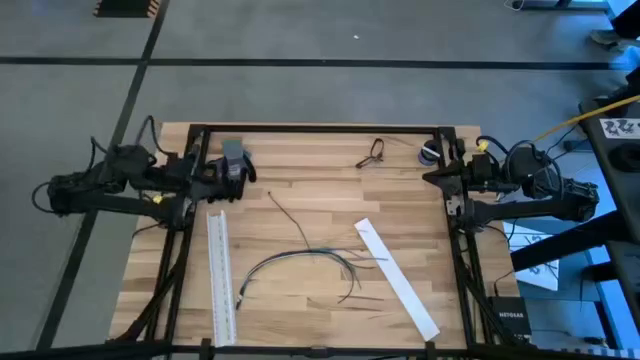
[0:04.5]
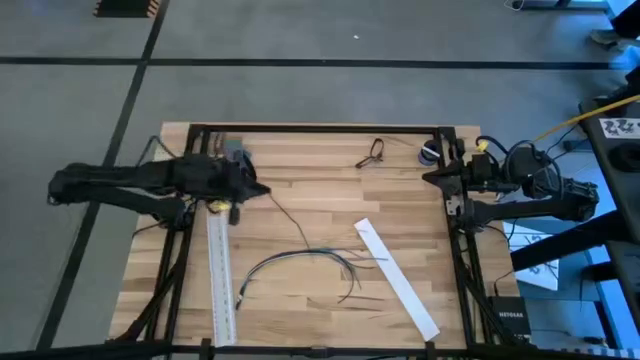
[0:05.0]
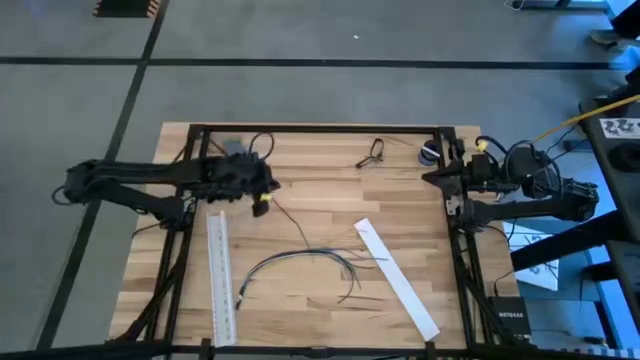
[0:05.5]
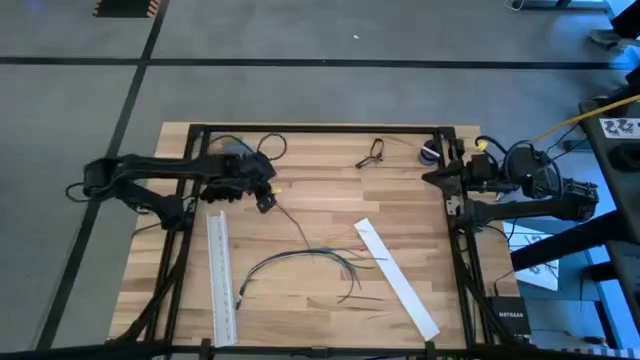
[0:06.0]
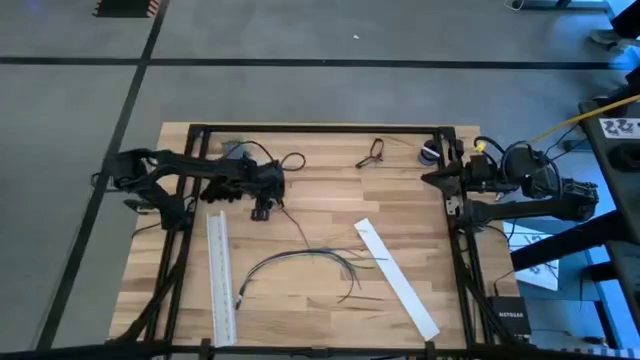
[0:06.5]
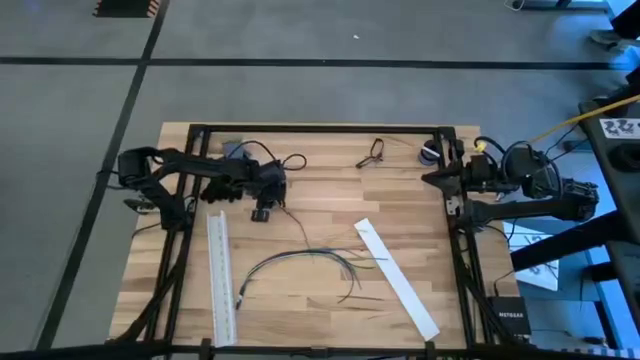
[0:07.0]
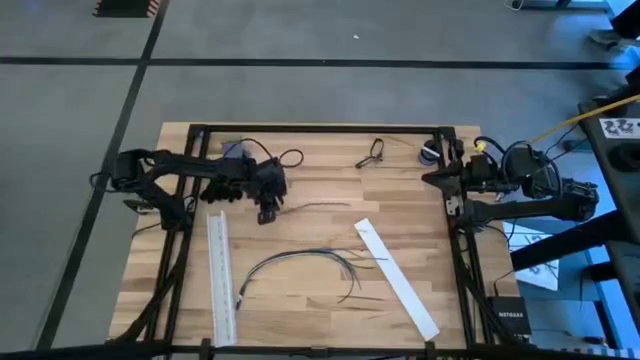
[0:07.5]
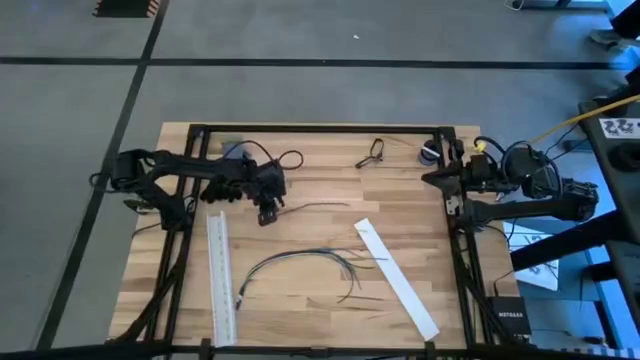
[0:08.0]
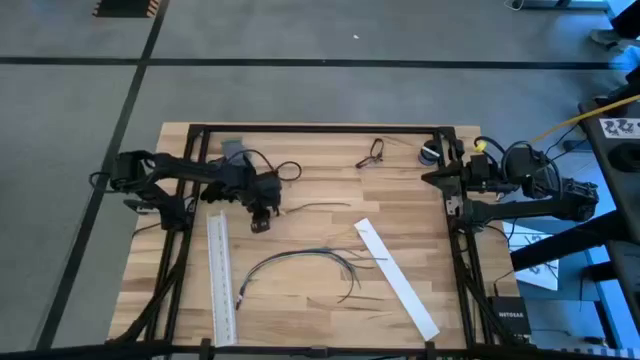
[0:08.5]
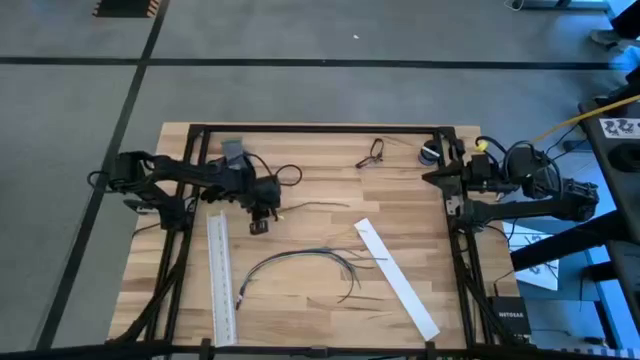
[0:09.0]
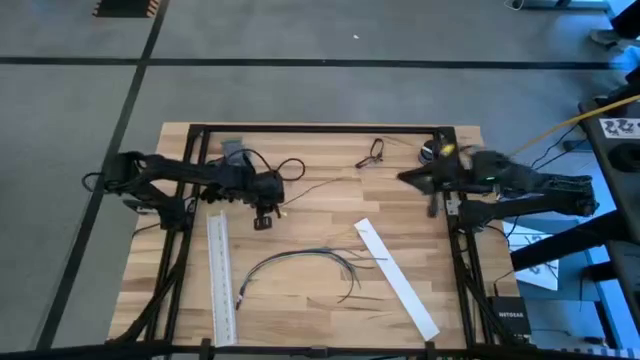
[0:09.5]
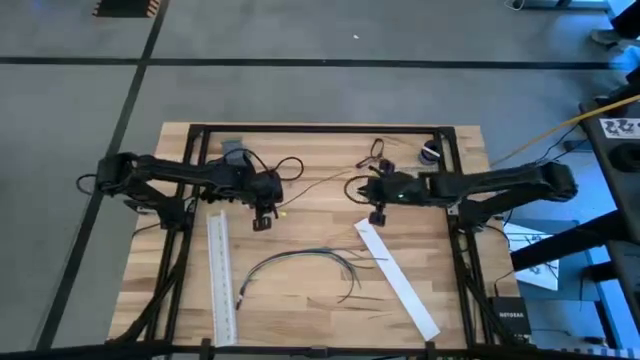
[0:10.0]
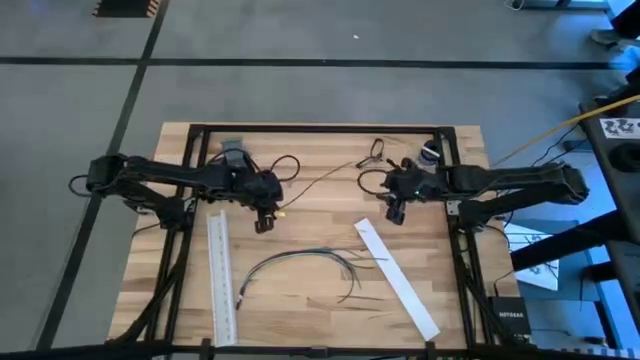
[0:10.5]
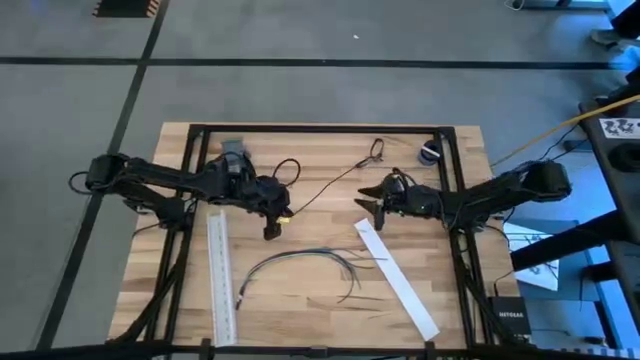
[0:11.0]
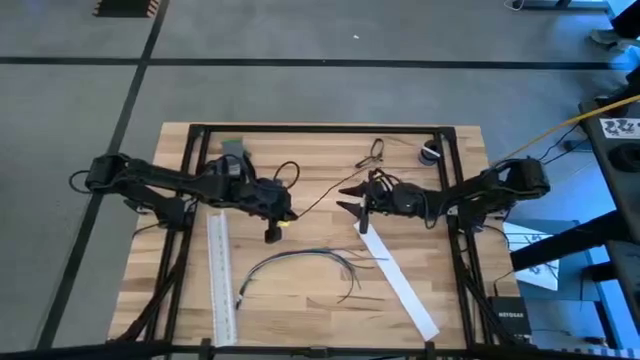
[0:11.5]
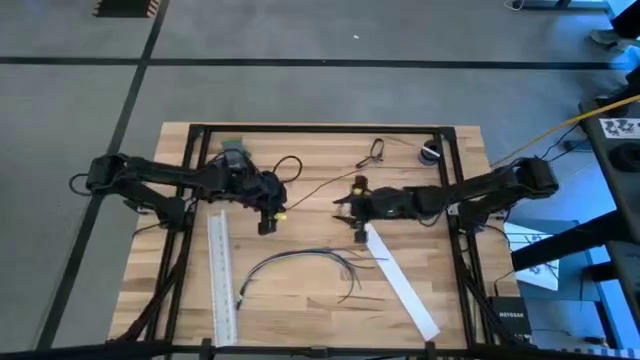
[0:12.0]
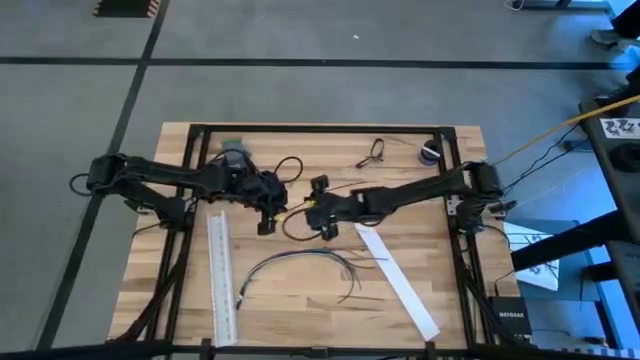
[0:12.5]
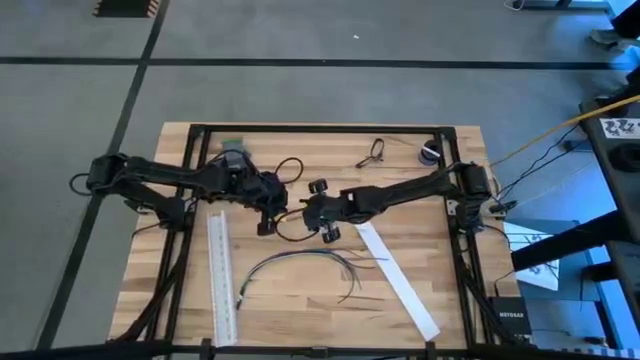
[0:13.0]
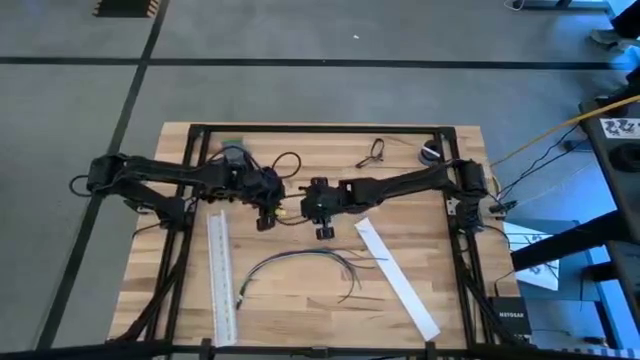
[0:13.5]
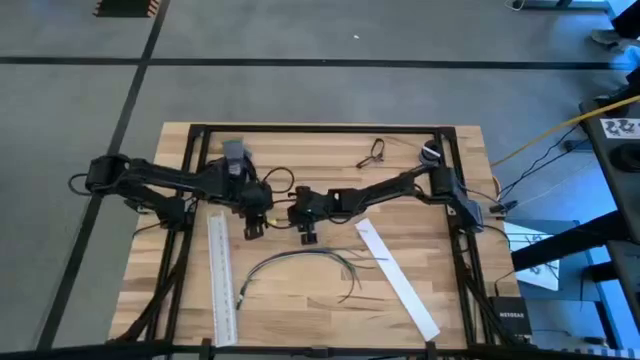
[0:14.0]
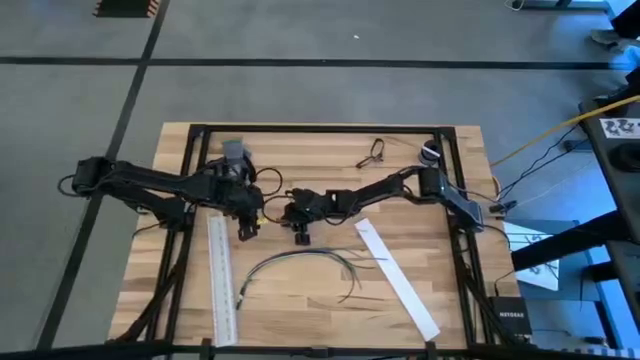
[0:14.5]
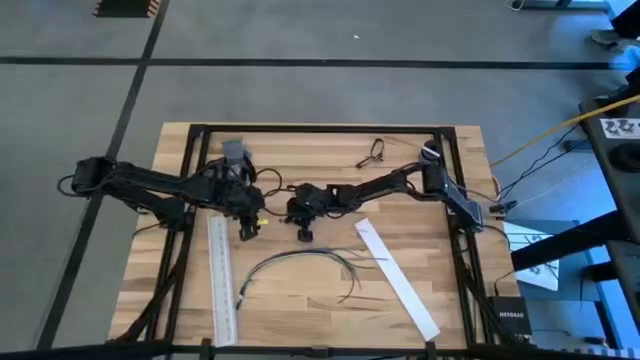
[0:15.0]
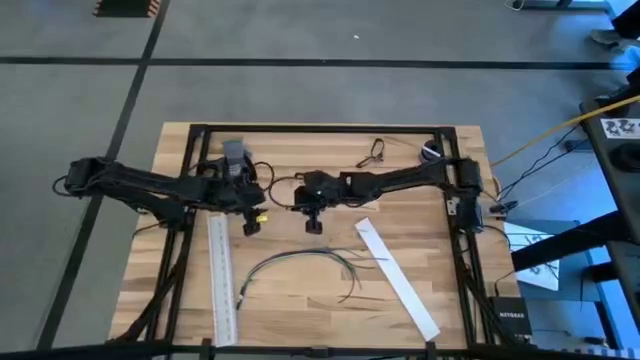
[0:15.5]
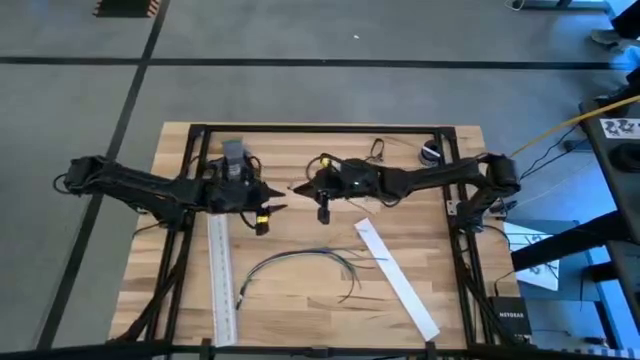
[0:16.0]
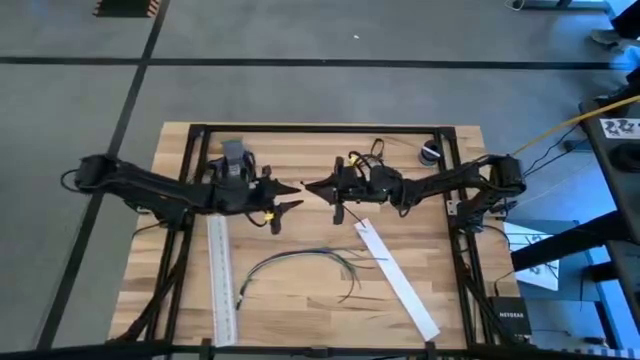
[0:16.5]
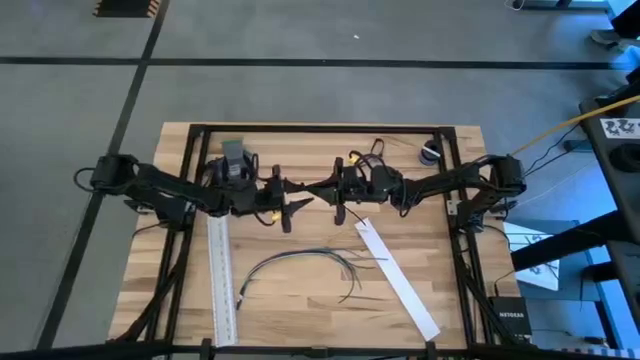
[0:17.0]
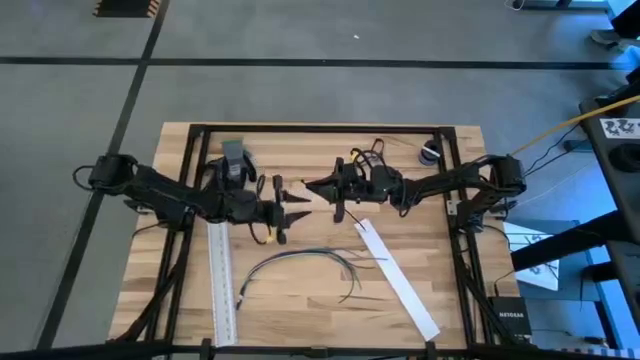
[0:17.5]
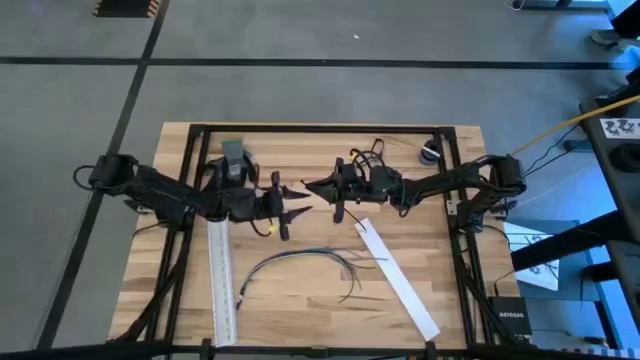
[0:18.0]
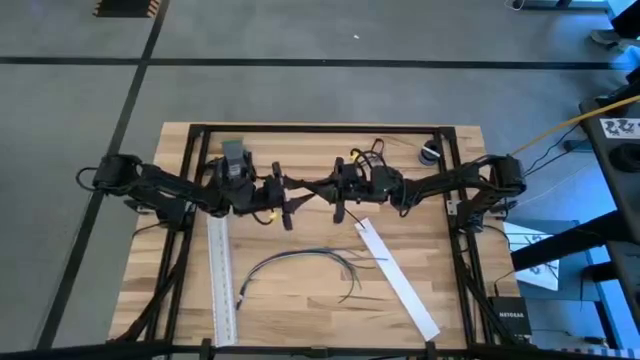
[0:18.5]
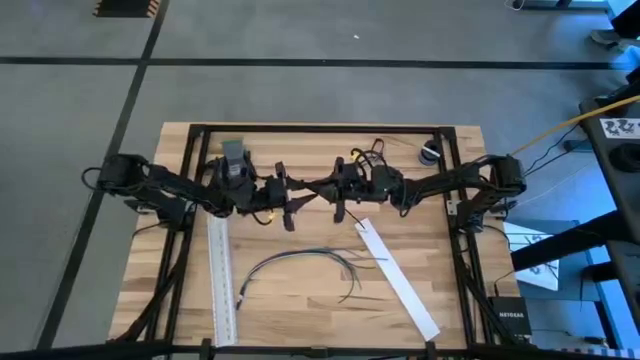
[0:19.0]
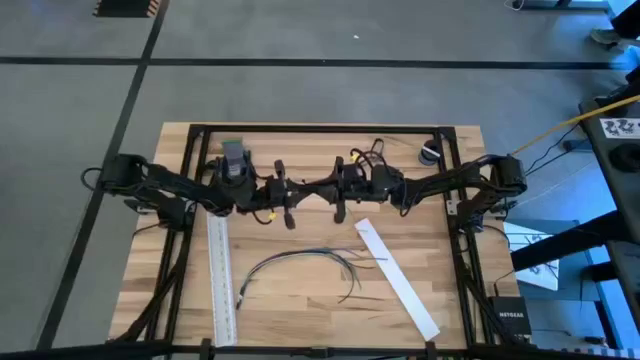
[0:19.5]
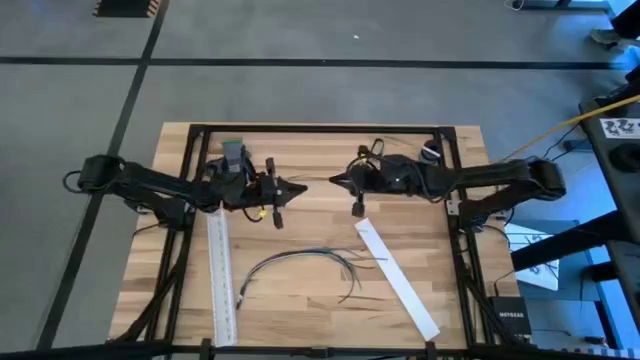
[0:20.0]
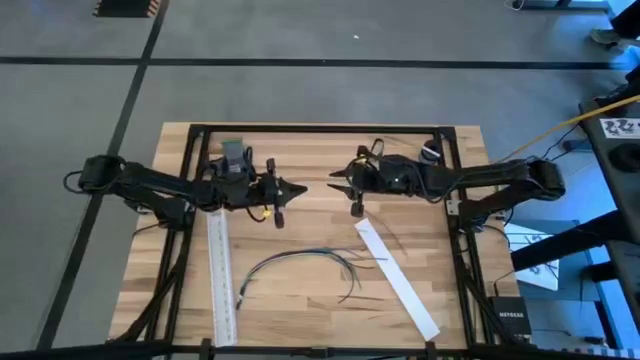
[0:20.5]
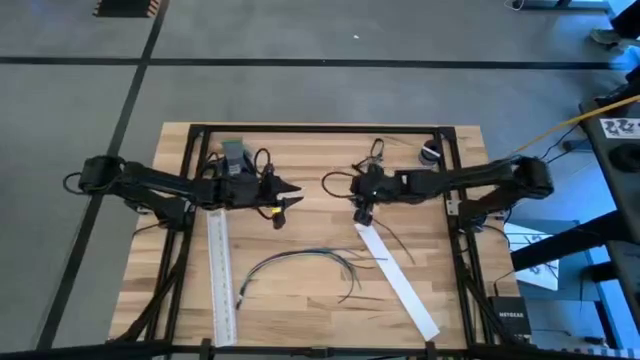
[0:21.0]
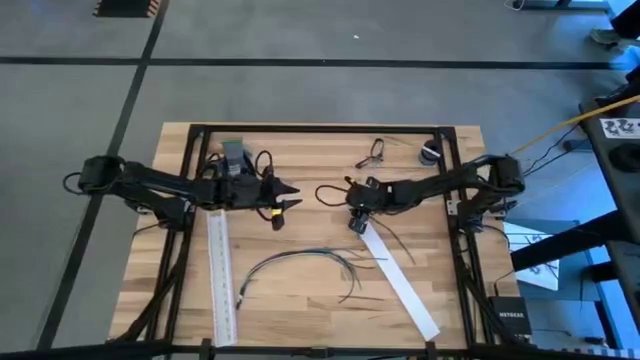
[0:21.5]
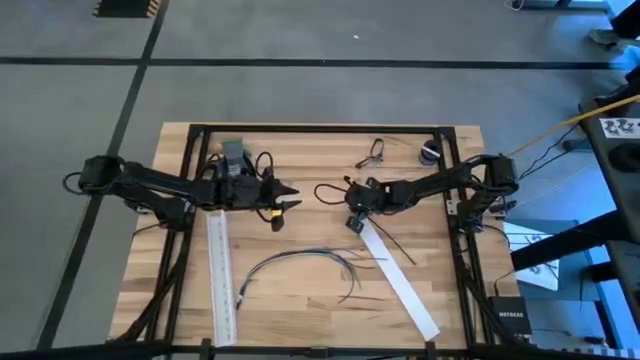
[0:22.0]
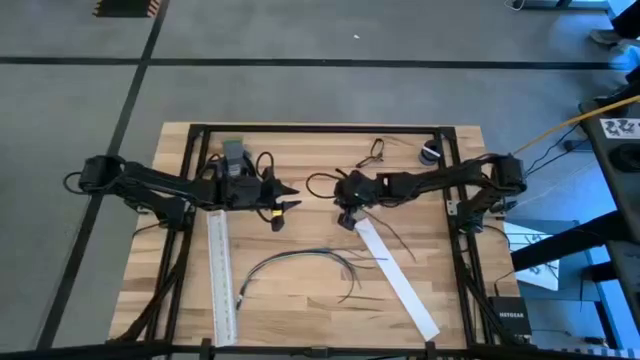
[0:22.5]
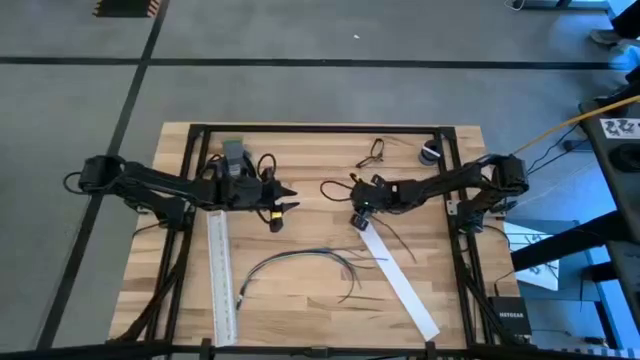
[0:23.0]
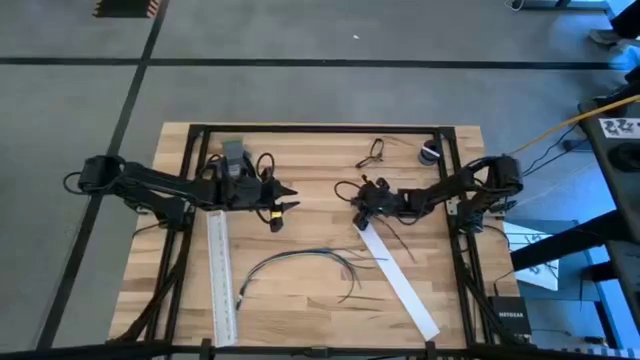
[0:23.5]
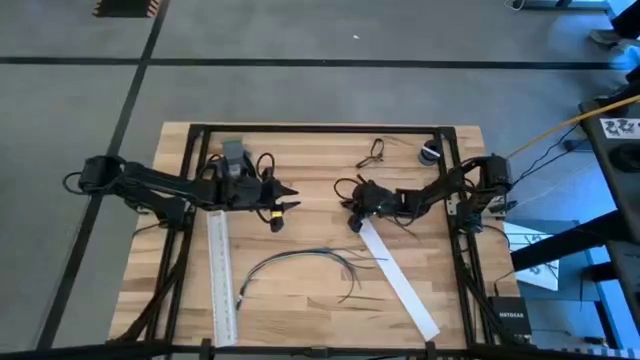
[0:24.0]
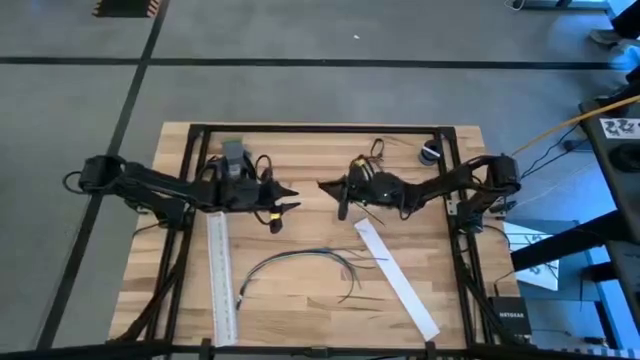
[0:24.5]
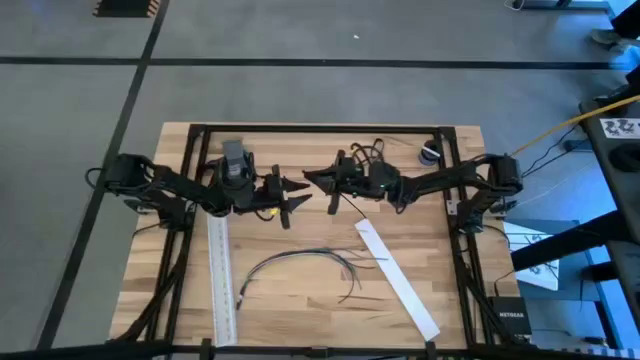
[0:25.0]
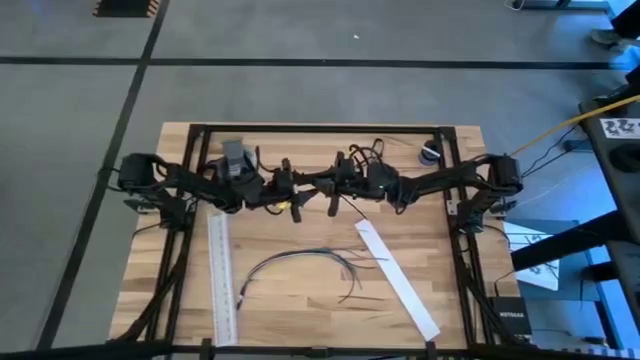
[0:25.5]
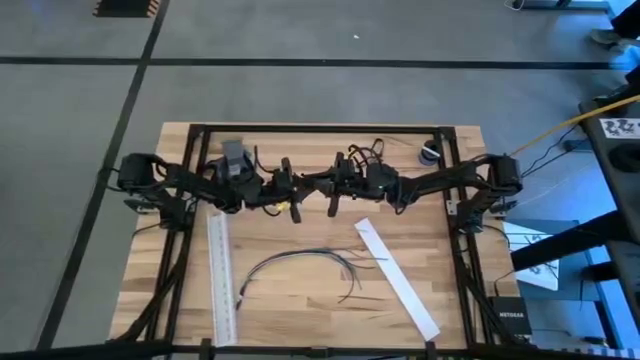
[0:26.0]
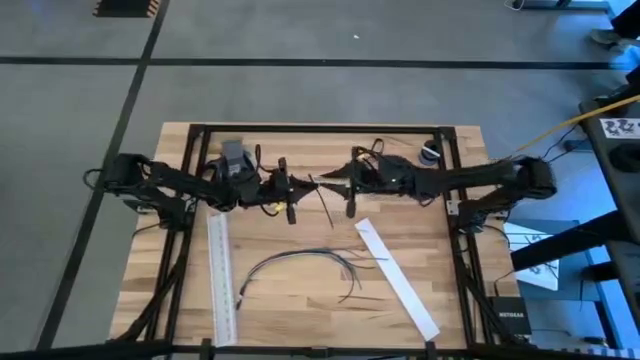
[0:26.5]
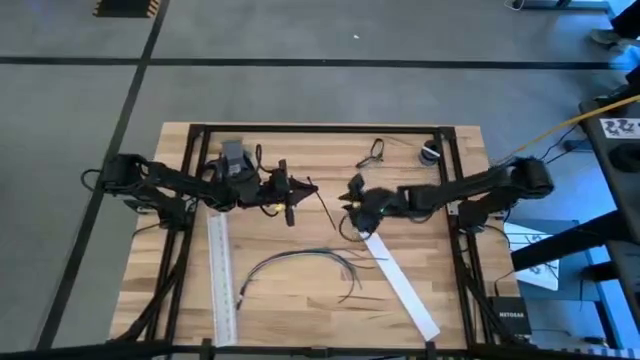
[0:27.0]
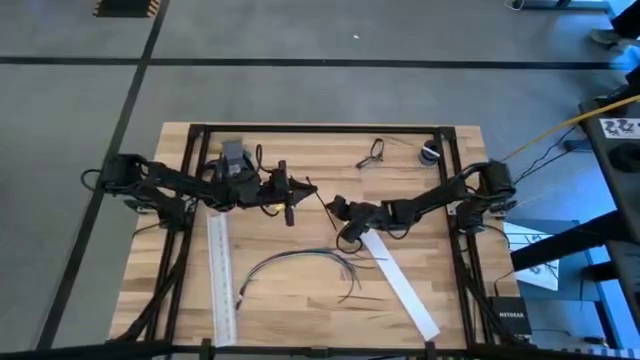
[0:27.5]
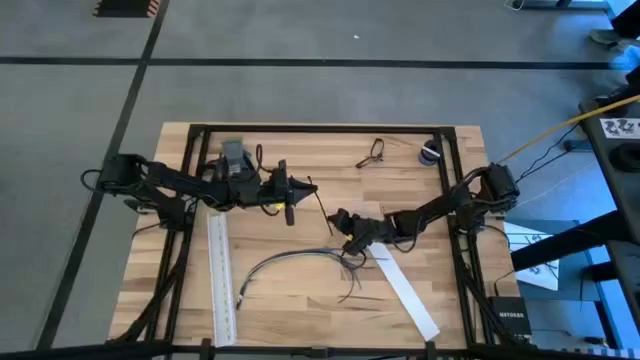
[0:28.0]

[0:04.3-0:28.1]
Task: Ziptie cables
Put the black zip tie on the cable wires
